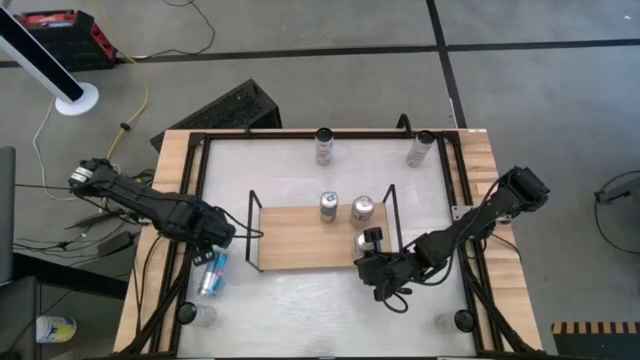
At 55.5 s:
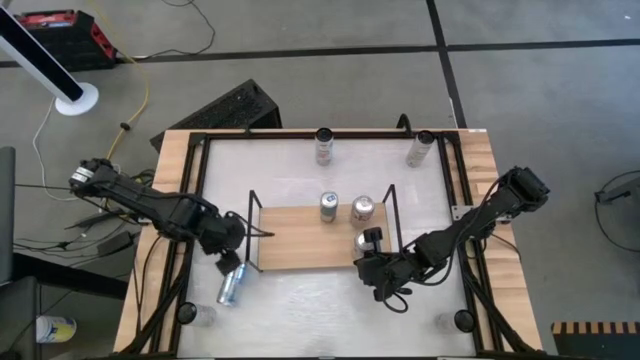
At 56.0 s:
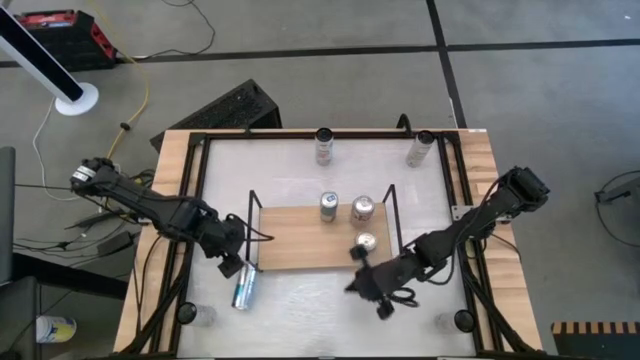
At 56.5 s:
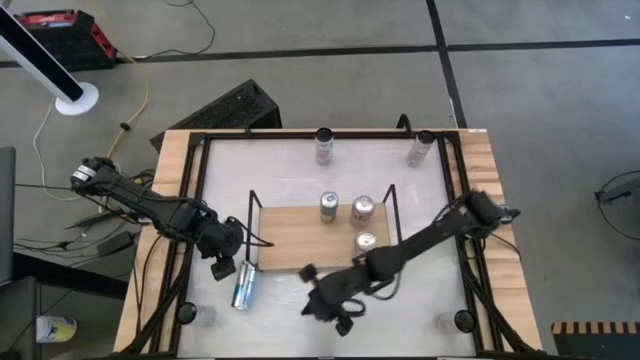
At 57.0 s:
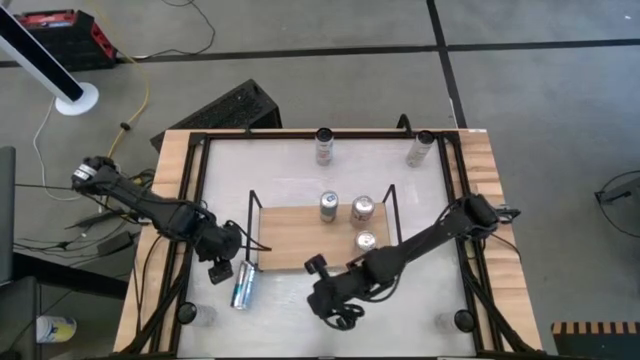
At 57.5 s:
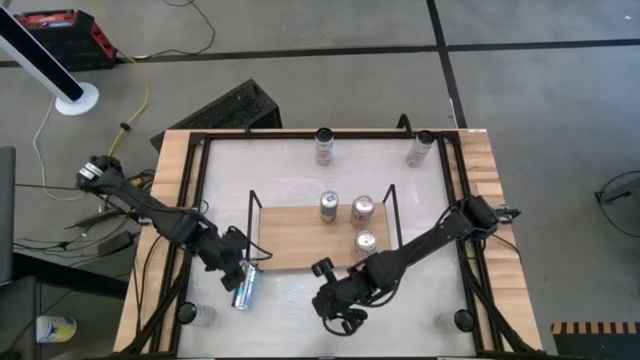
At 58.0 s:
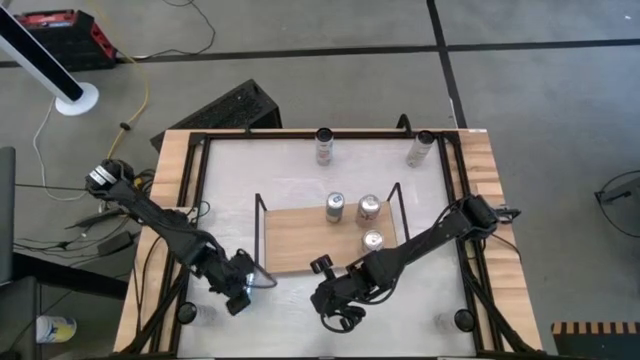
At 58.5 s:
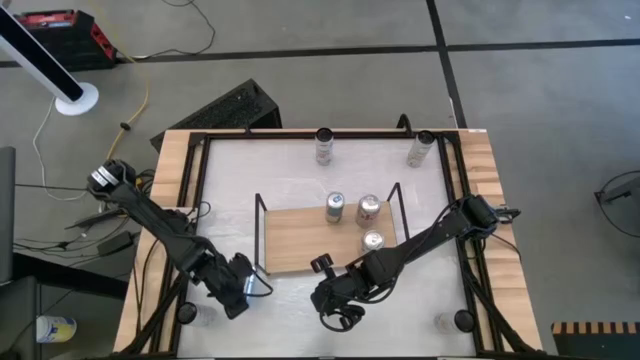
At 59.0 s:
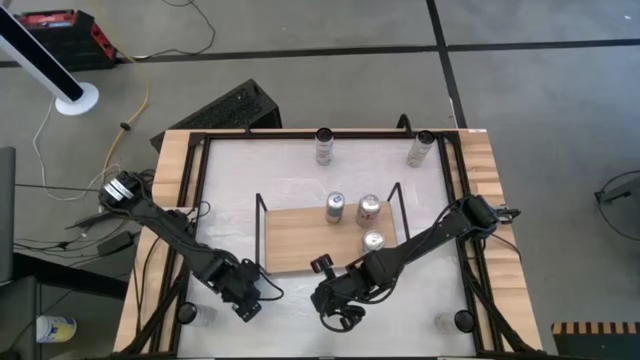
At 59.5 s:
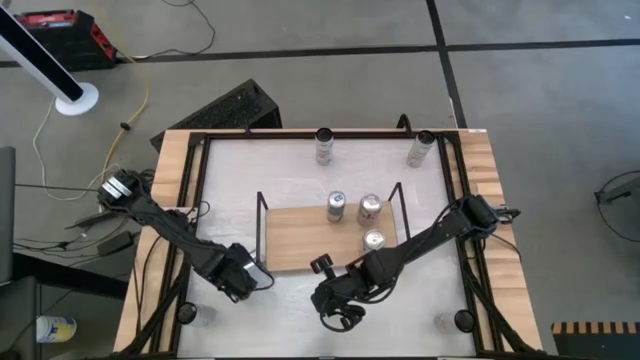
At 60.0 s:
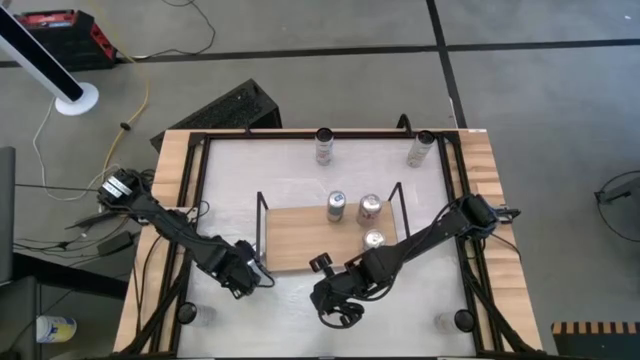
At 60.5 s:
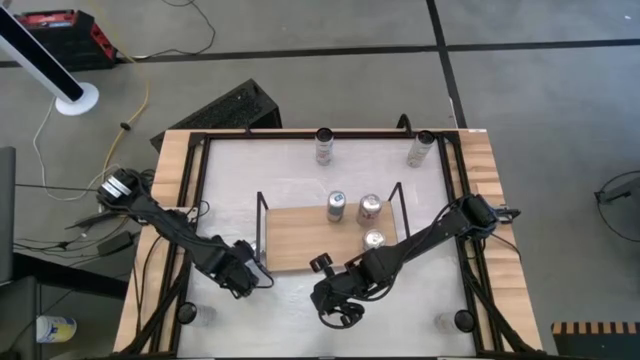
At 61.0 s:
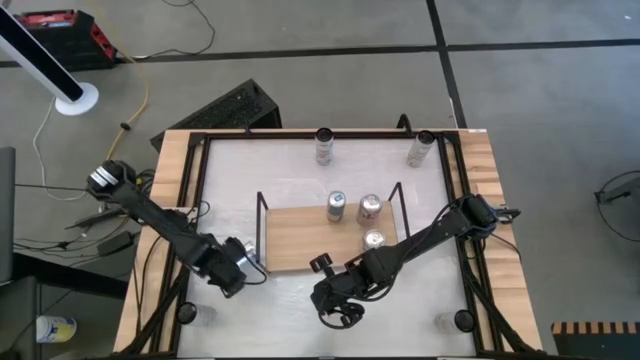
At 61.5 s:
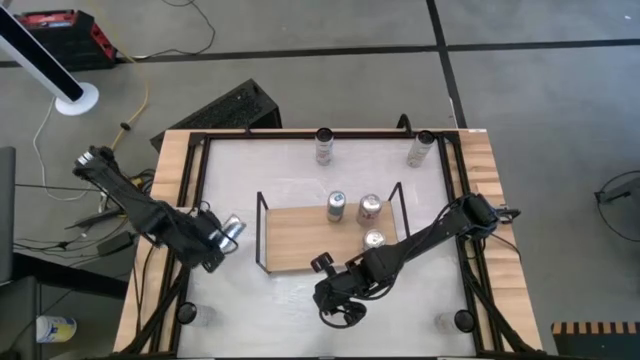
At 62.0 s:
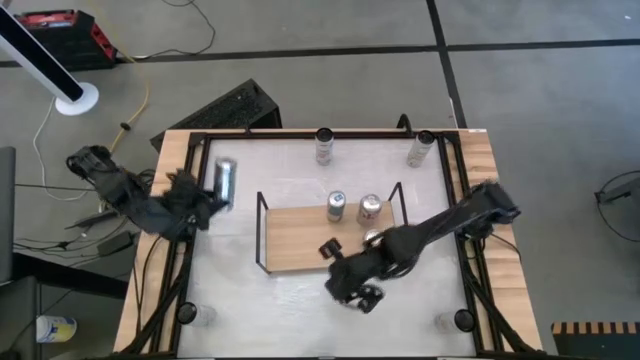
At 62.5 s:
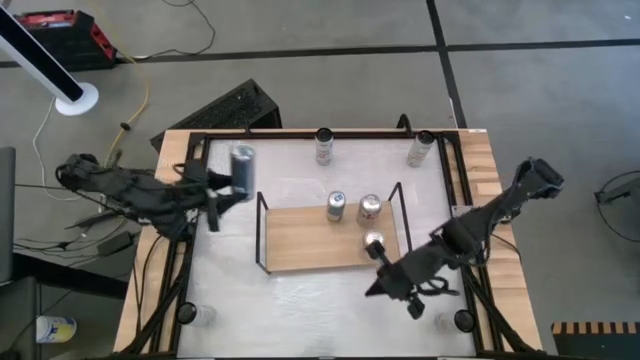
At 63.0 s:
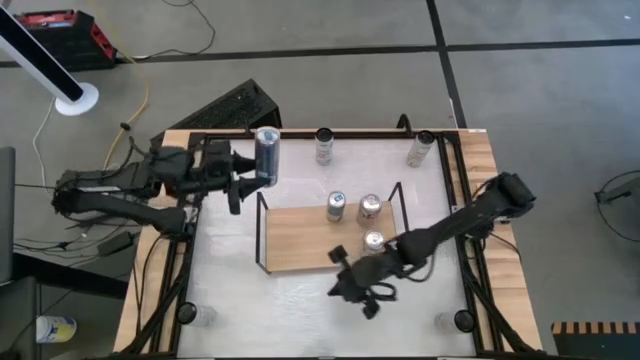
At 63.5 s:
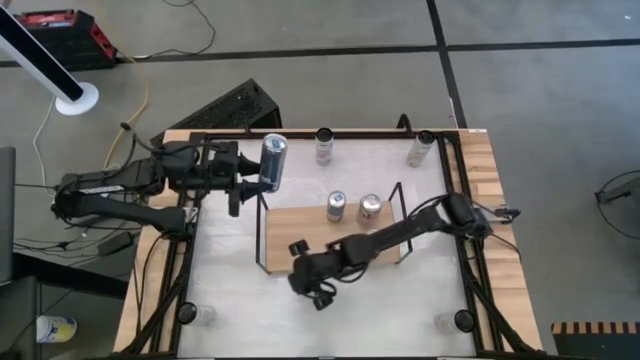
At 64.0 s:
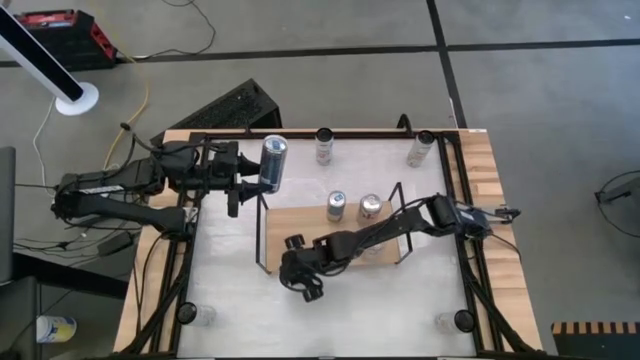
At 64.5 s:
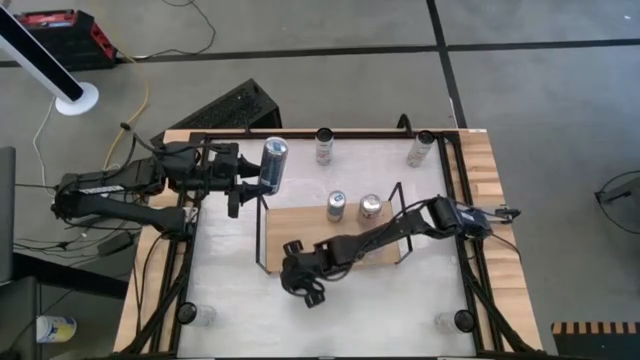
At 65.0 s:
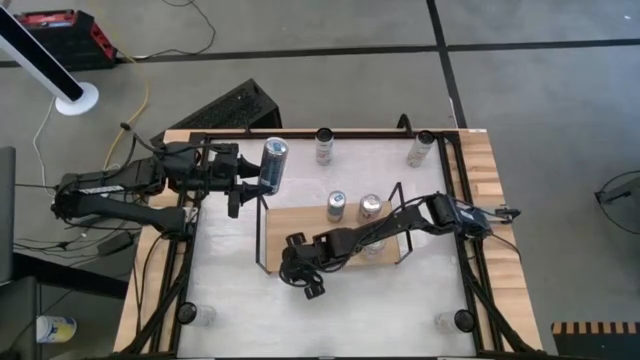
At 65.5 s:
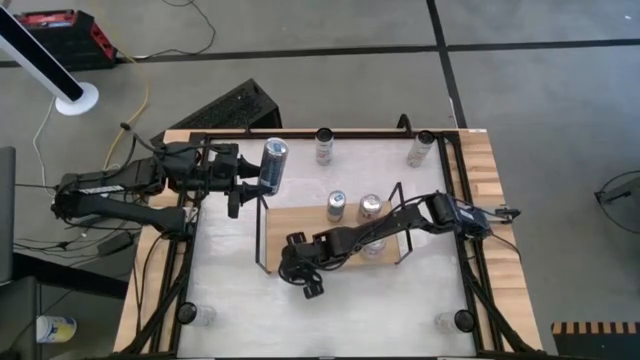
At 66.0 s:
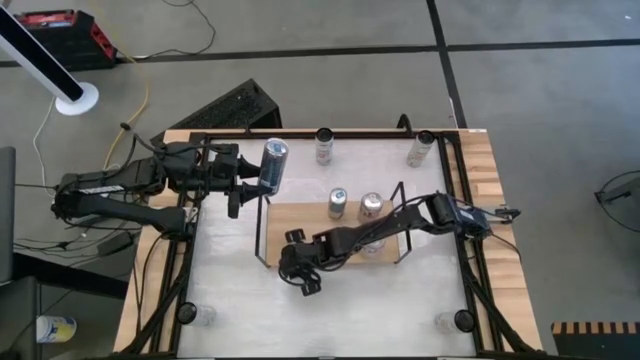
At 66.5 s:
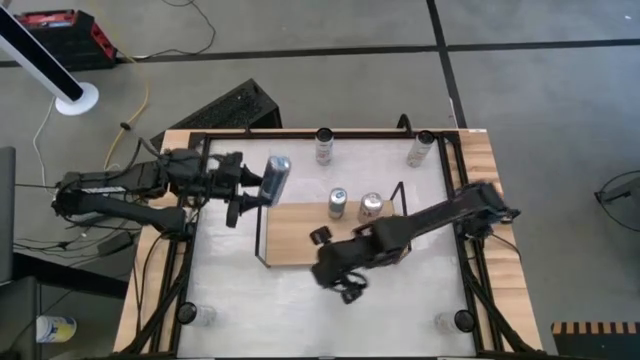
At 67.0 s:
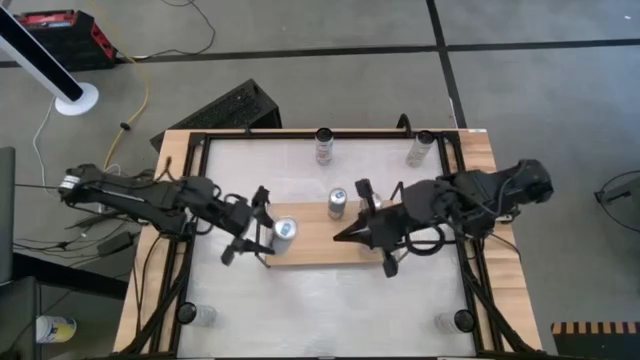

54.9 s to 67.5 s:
Task: Place canned beverage on shelf
Put the blue soda can on the shelf aligned with the other blue soda can

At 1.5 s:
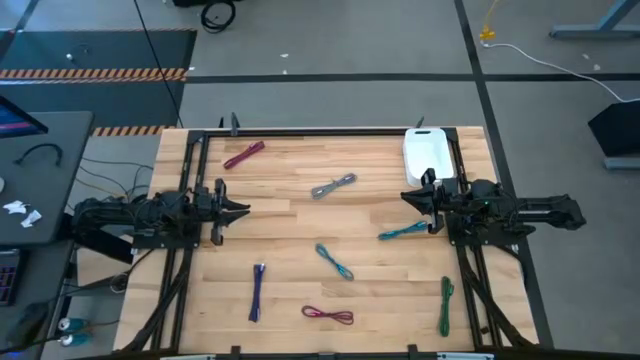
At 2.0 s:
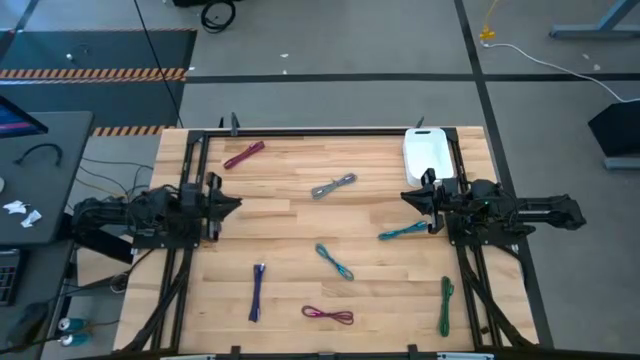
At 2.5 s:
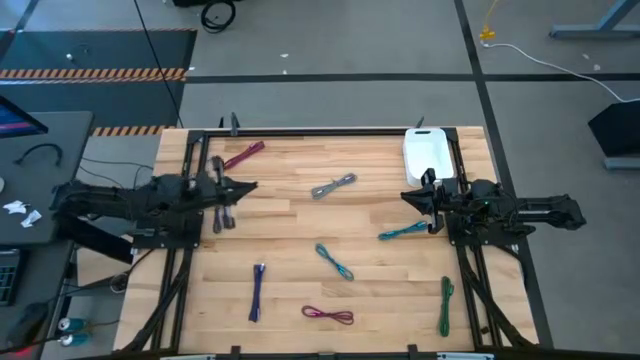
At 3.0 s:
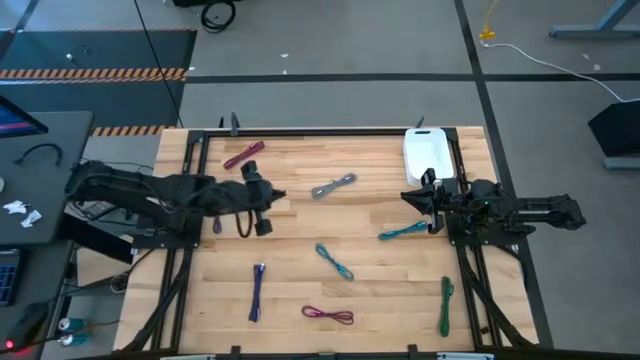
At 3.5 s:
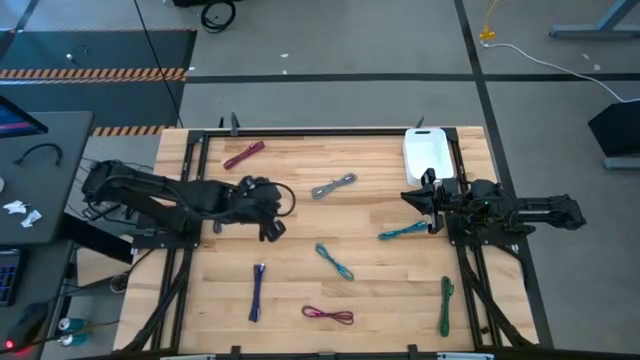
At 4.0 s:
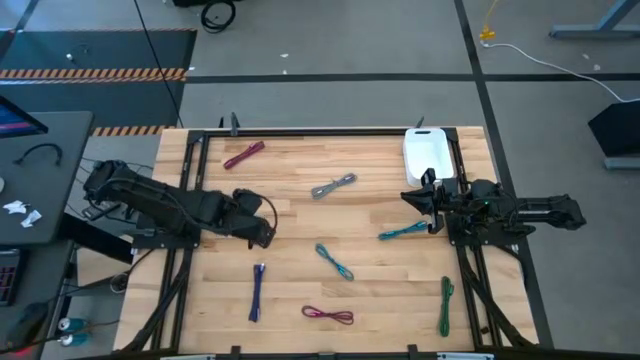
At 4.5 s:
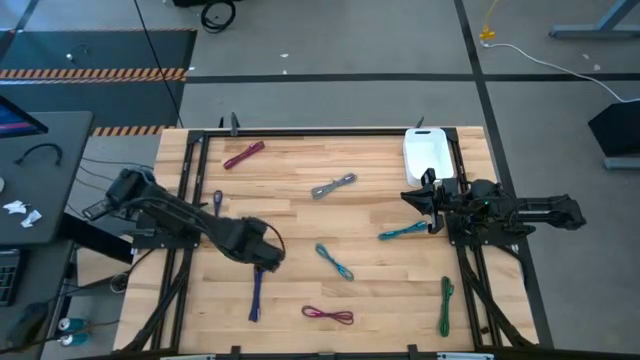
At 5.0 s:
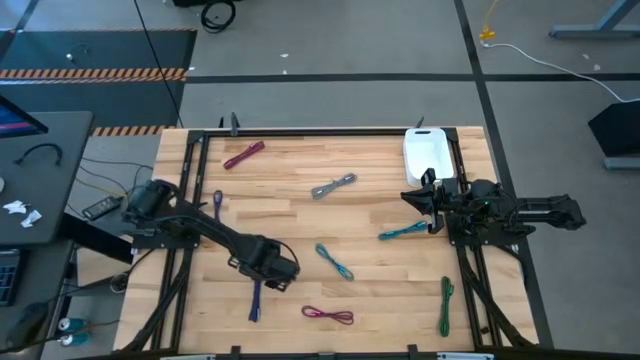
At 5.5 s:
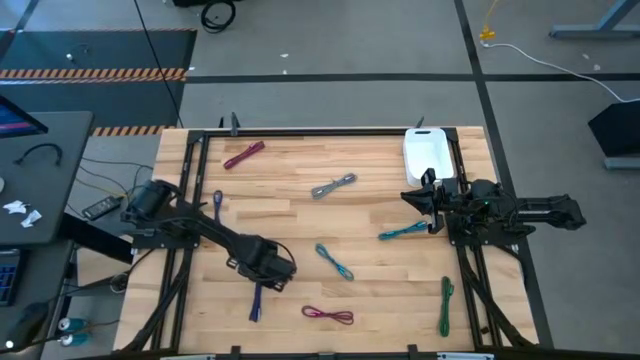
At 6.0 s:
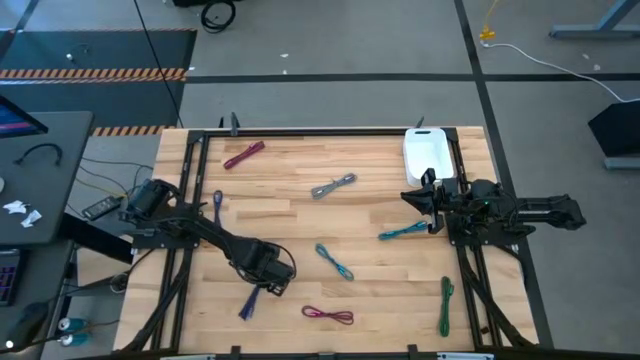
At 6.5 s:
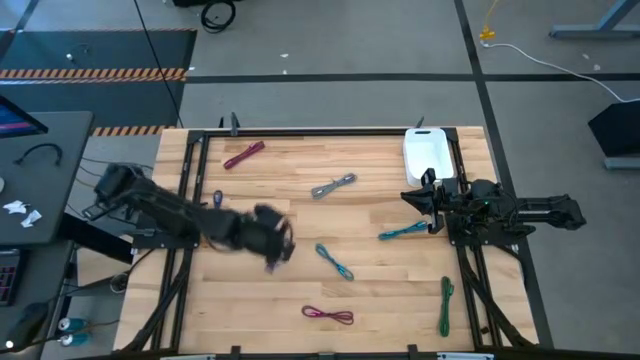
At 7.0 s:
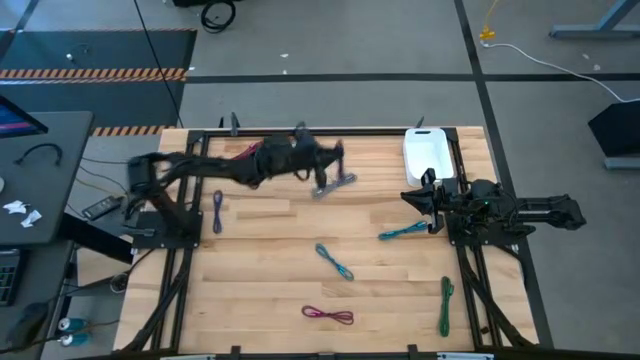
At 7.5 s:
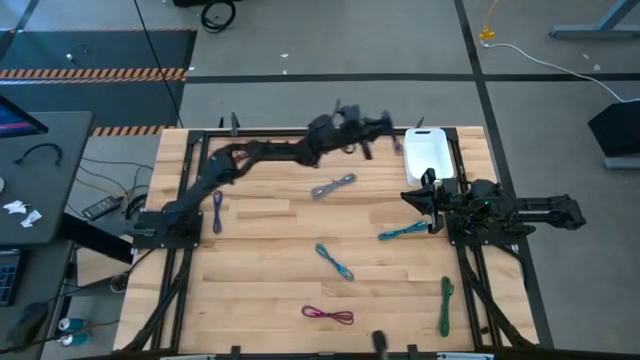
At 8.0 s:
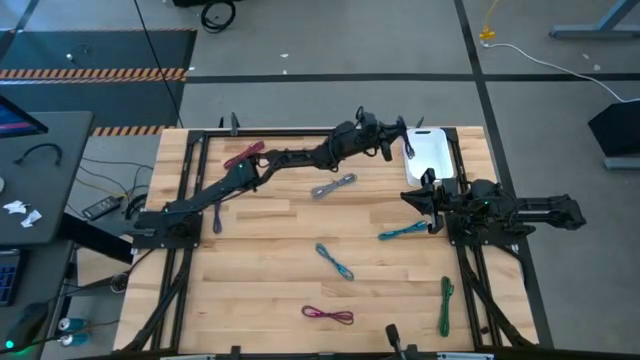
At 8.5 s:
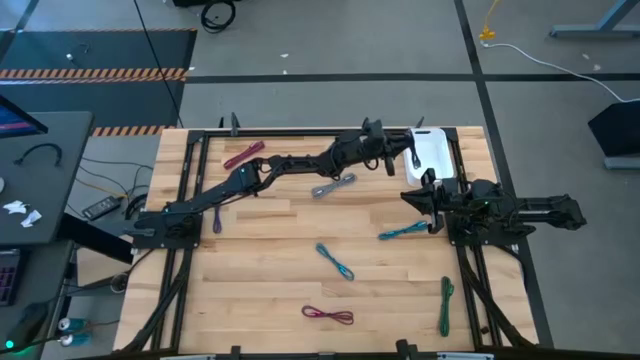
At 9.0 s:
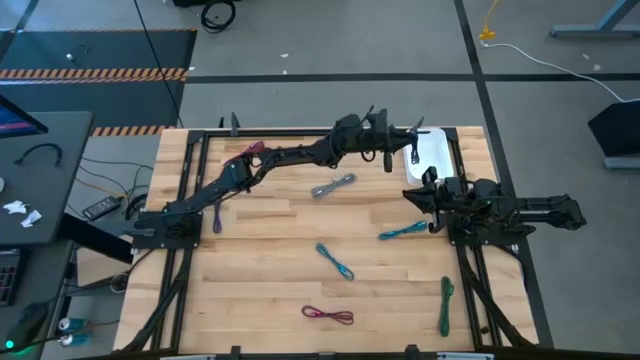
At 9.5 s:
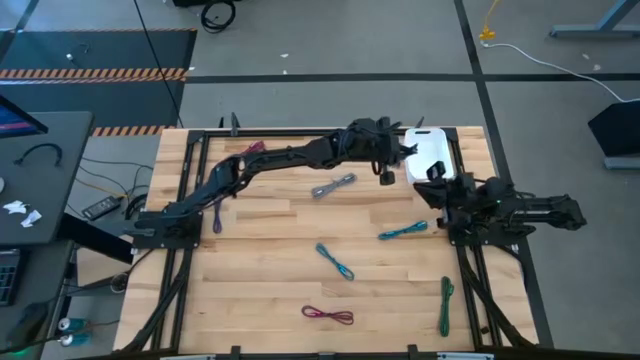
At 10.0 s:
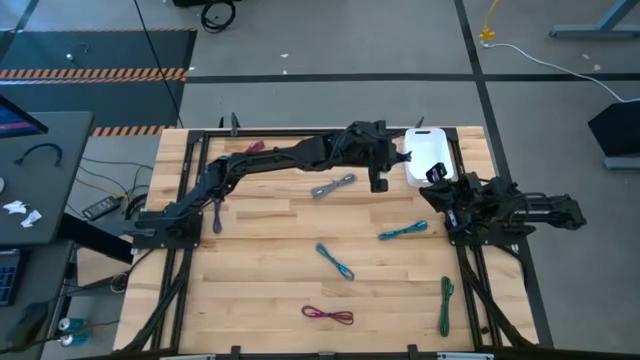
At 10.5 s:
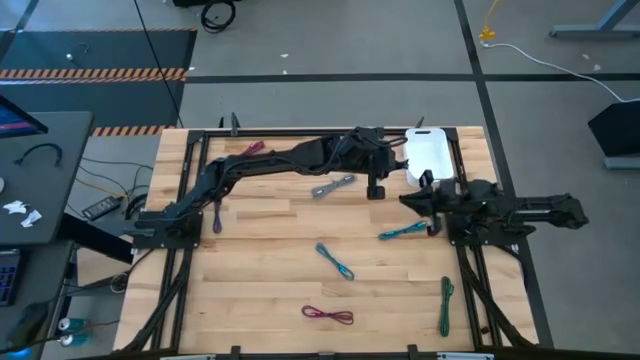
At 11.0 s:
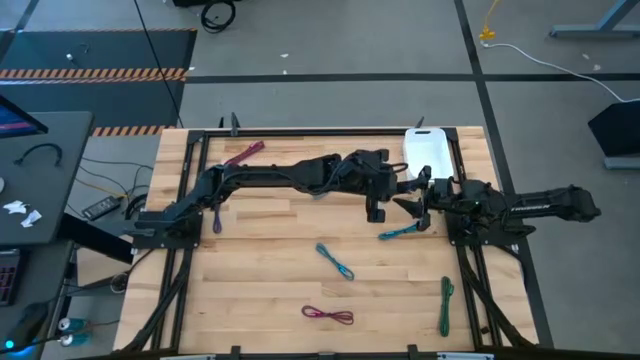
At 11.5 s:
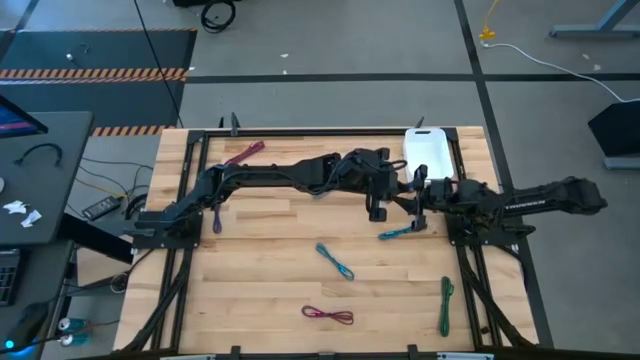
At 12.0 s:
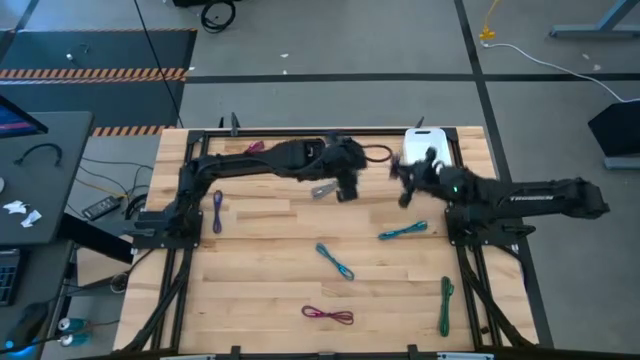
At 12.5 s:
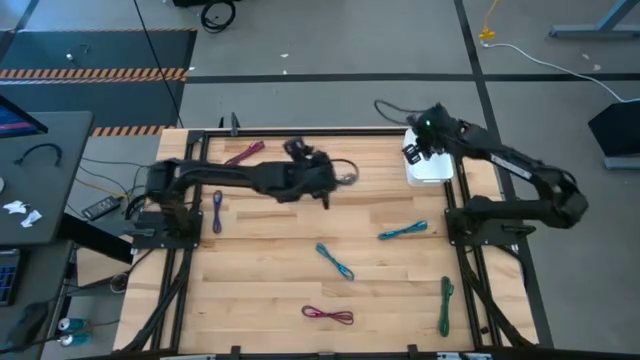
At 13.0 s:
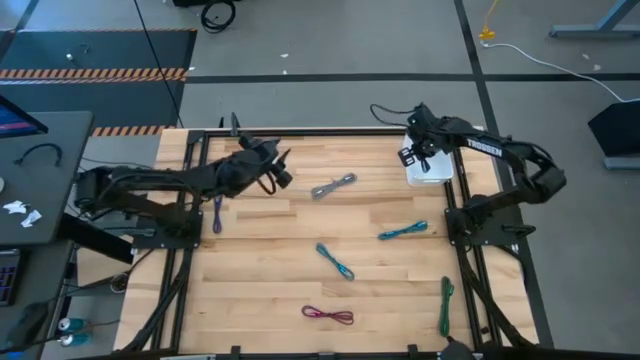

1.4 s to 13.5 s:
Task: Pick and place USB-C Cables
Put the bottom black violet charger cable into the bin
